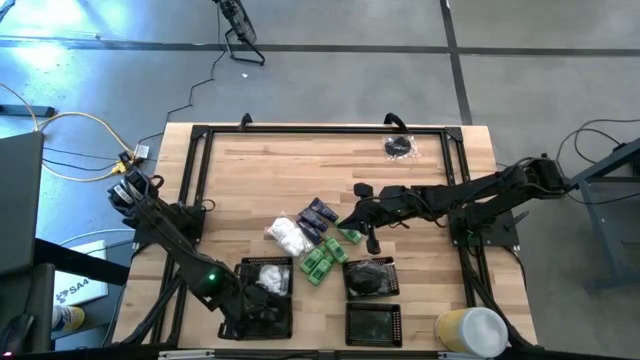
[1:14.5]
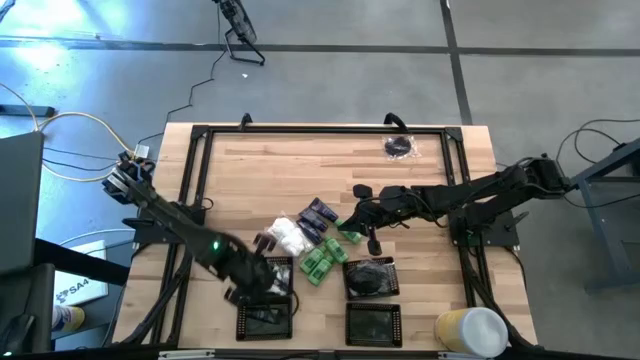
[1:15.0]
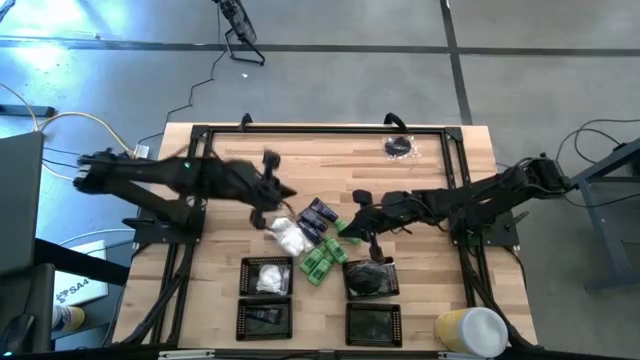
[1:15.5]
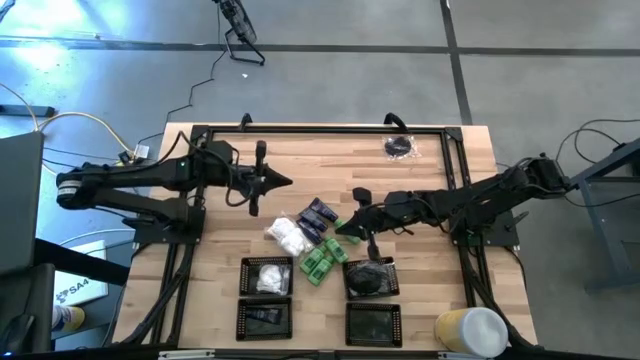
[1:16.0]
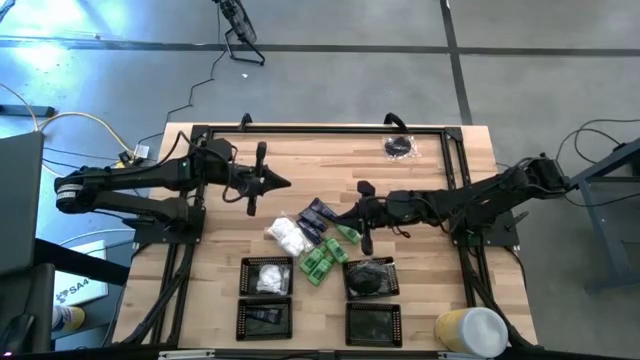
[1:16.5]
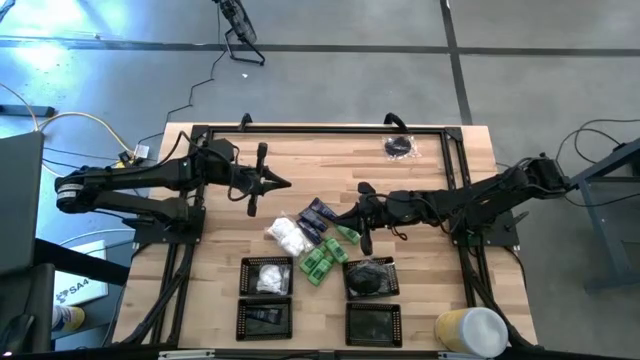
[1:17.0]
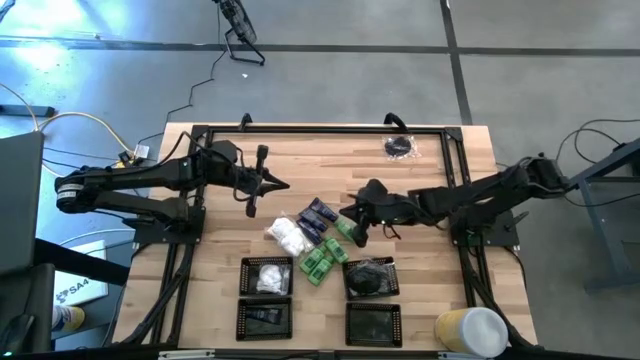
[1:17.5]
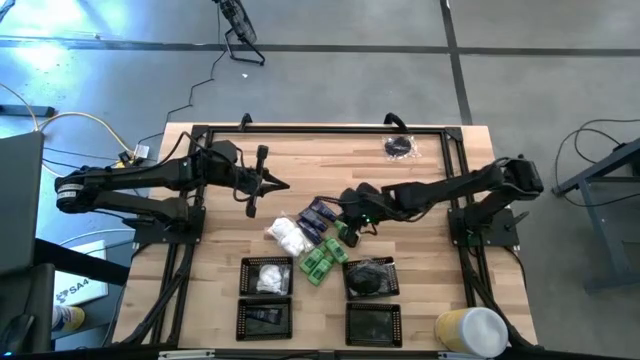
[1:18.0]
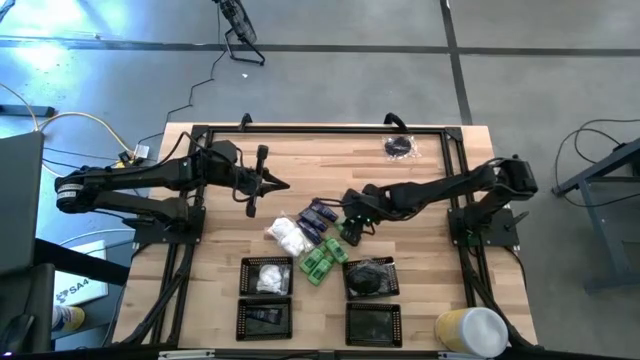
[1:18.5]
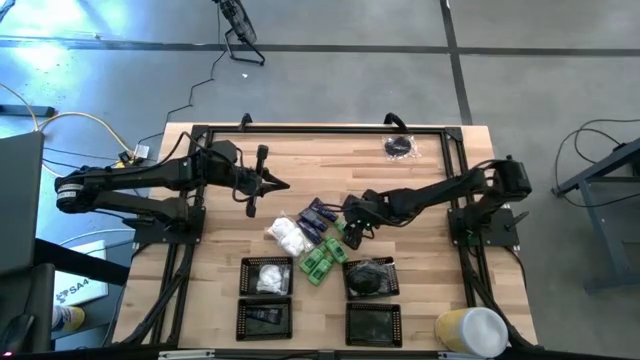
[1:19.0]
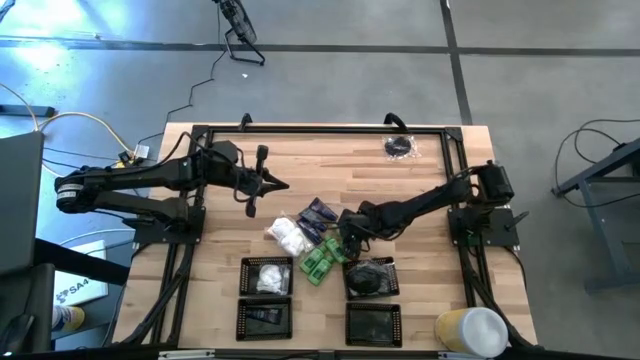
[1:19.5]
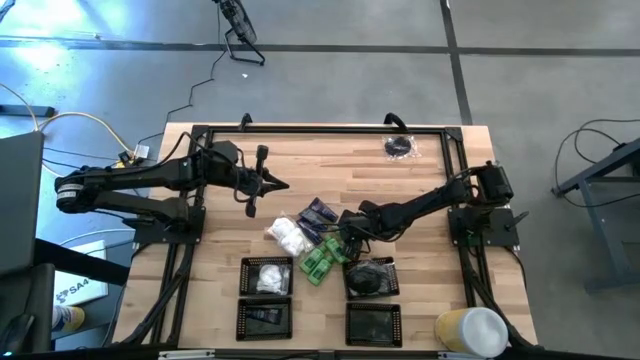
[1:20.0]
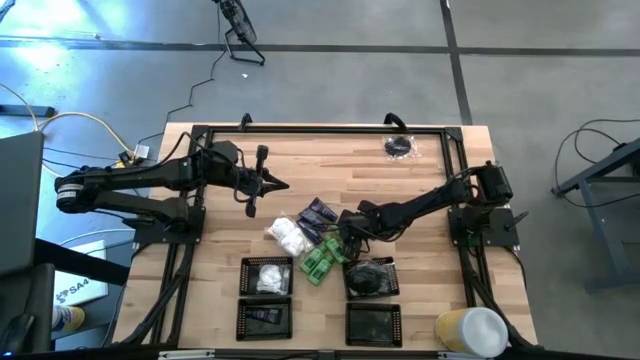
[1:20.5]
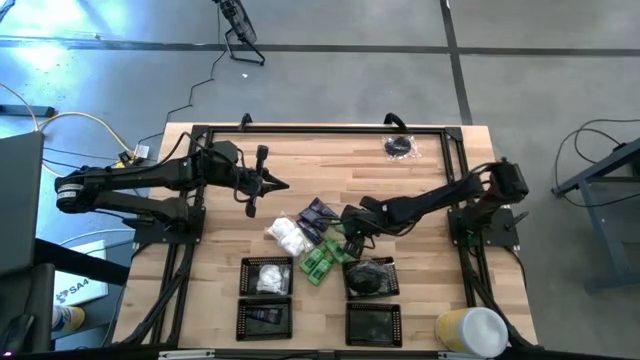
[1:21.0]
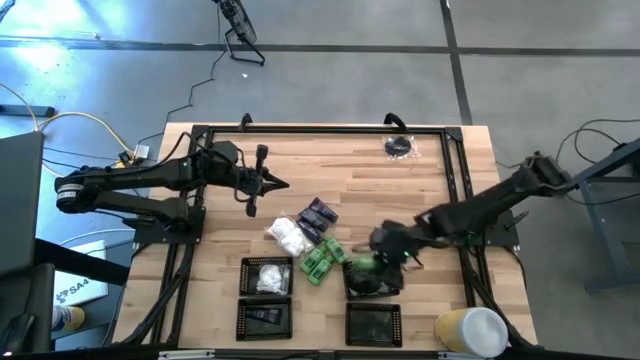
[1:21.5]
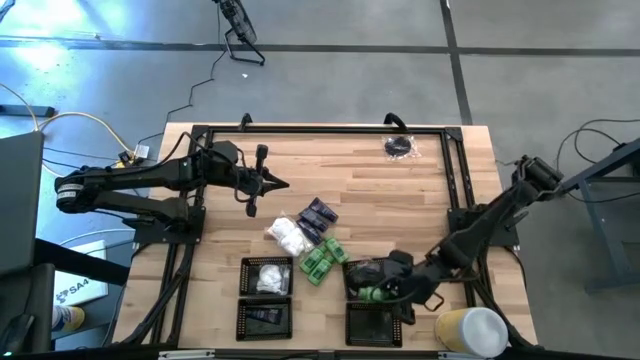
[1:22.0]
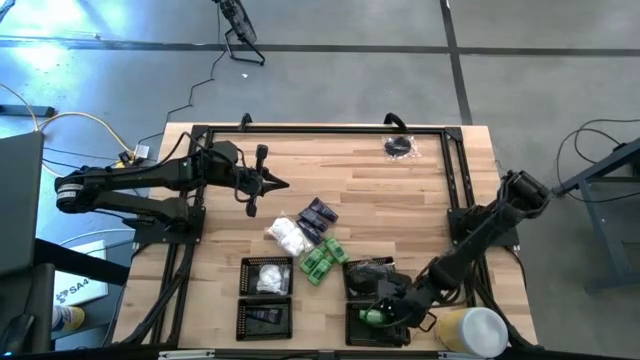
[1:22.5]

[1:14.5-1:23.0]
Task: Pick & Place Travel size toiletries
Put the green shampoo bottle into the bottom right black bin

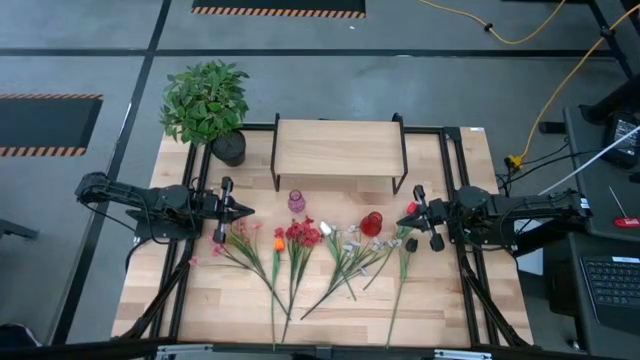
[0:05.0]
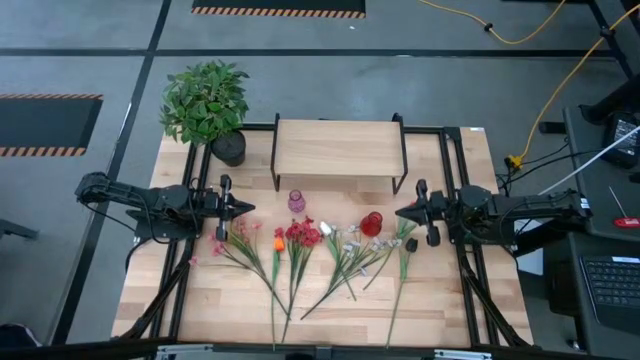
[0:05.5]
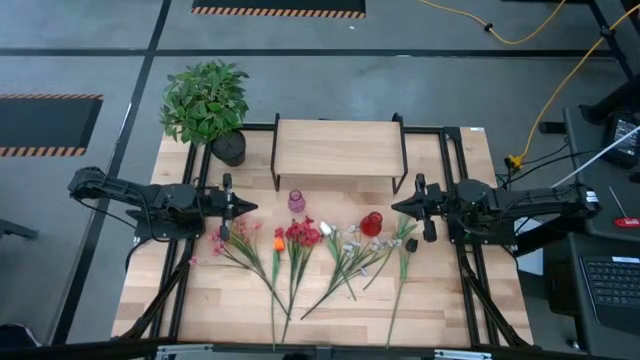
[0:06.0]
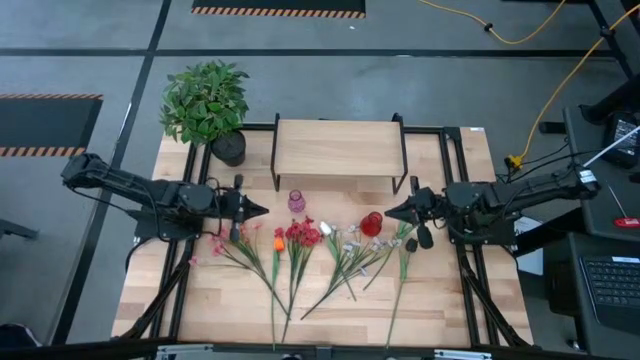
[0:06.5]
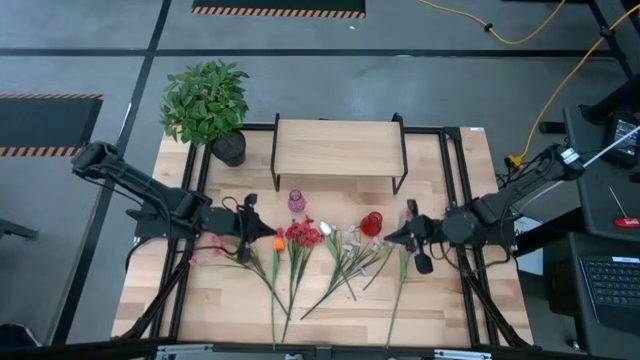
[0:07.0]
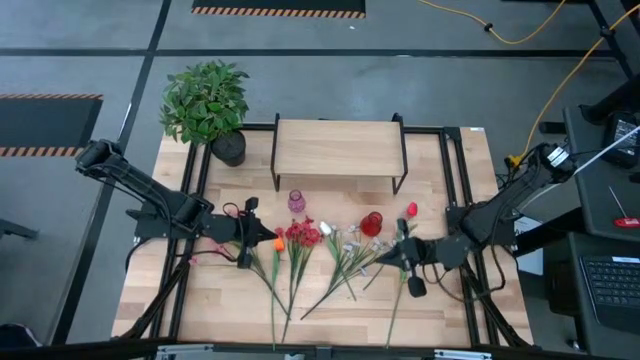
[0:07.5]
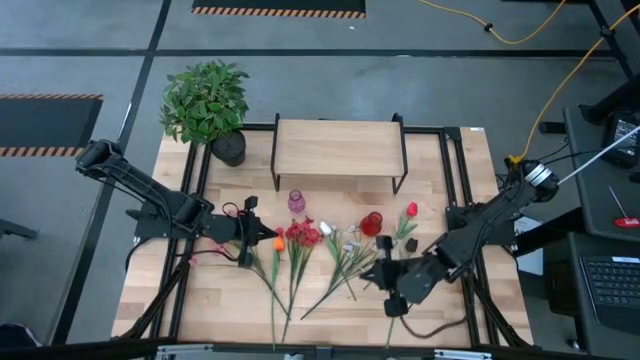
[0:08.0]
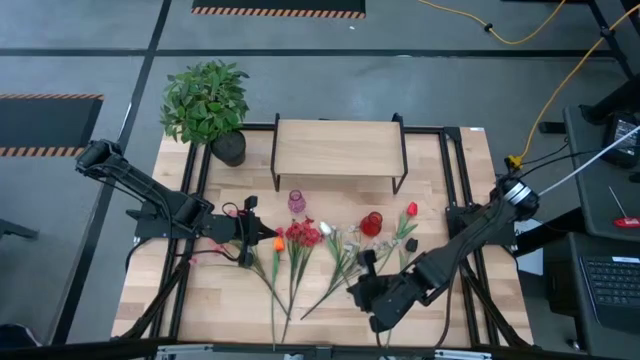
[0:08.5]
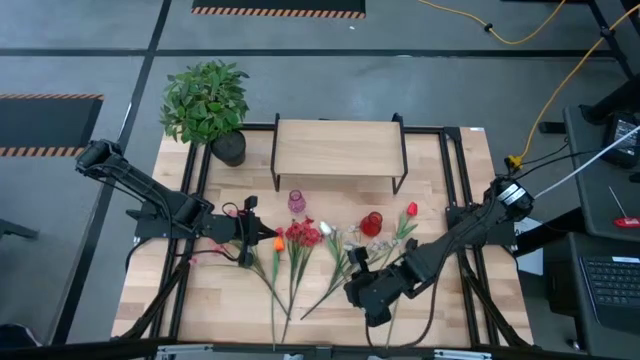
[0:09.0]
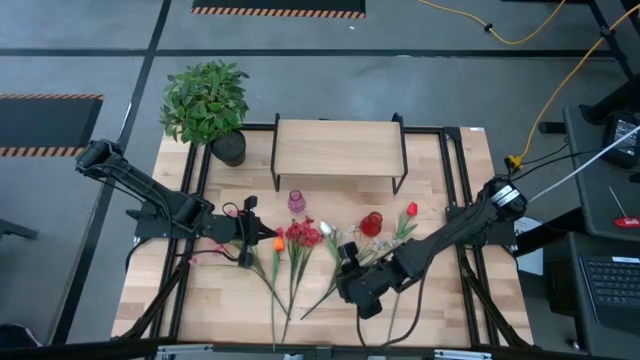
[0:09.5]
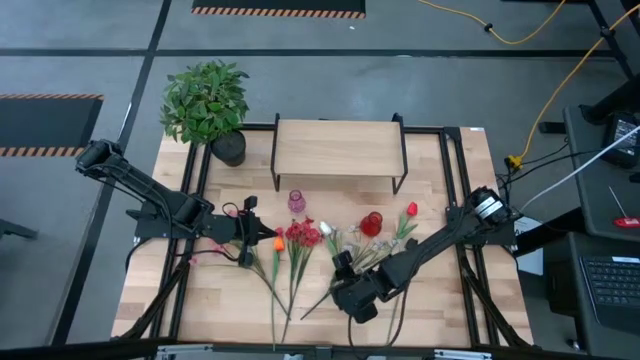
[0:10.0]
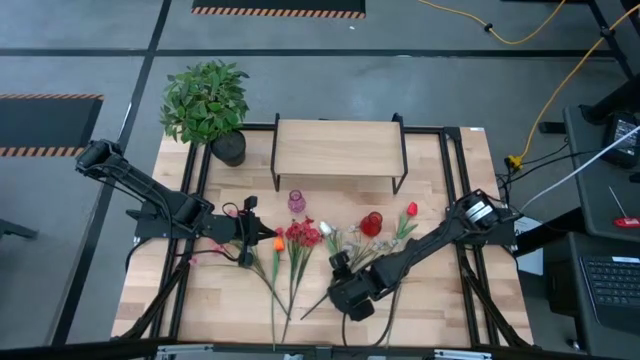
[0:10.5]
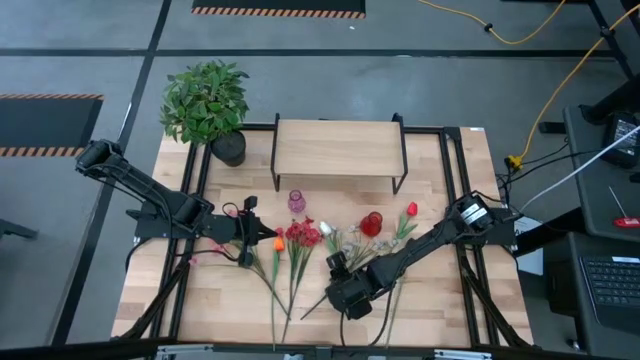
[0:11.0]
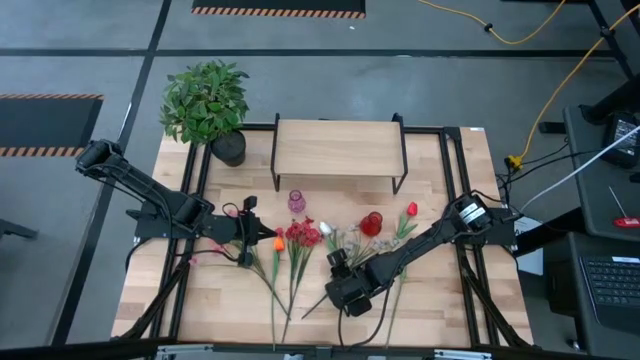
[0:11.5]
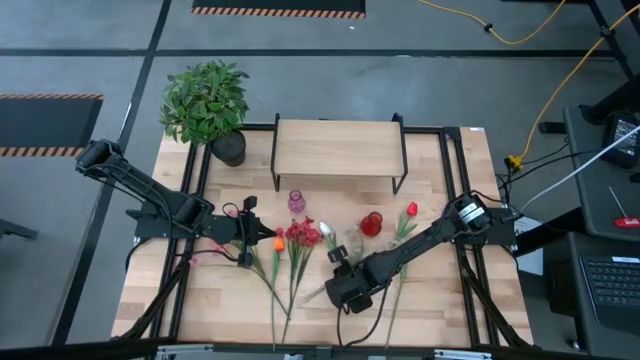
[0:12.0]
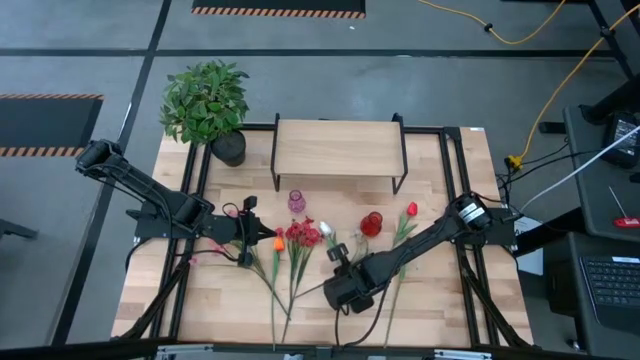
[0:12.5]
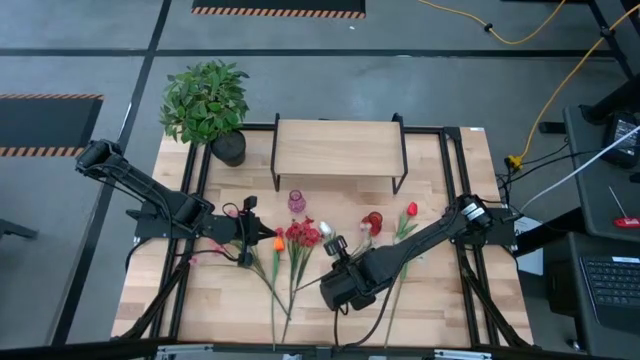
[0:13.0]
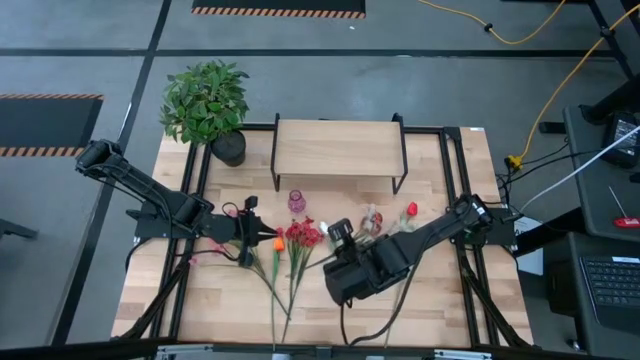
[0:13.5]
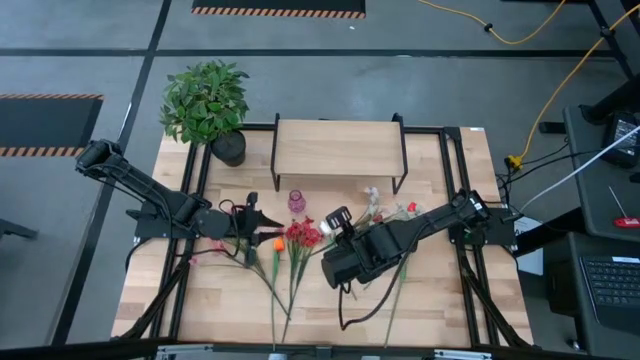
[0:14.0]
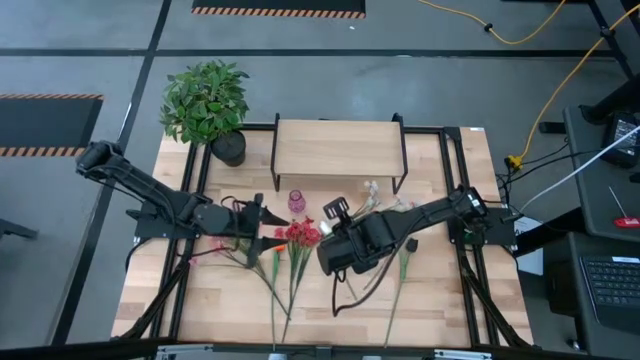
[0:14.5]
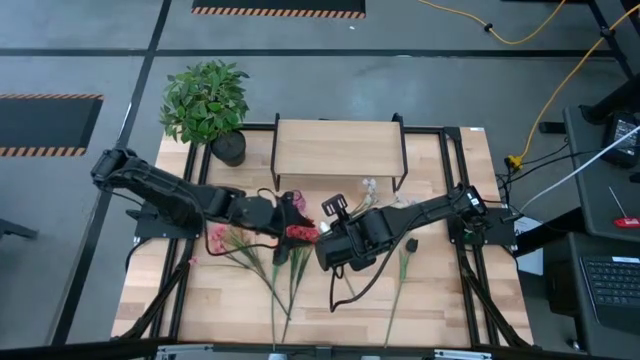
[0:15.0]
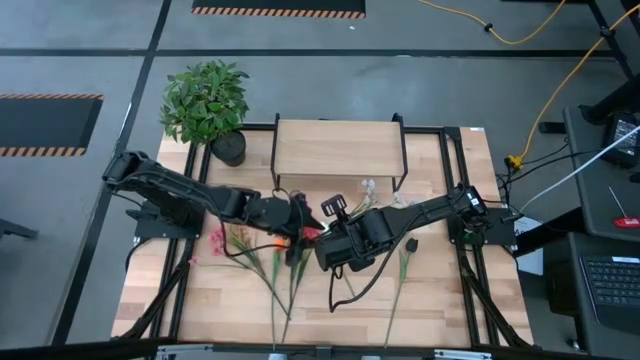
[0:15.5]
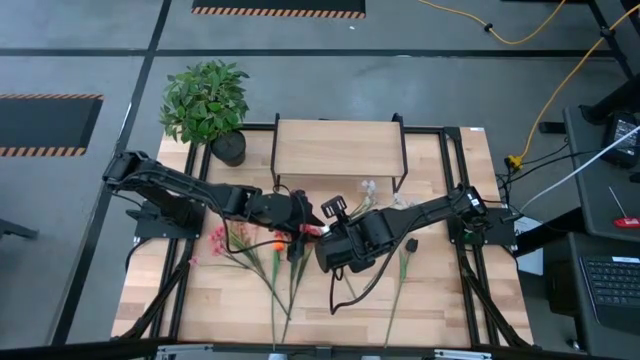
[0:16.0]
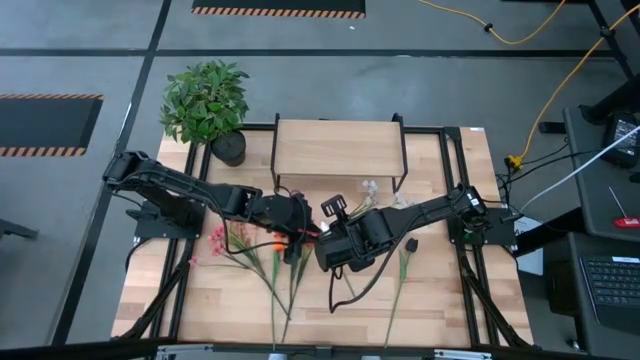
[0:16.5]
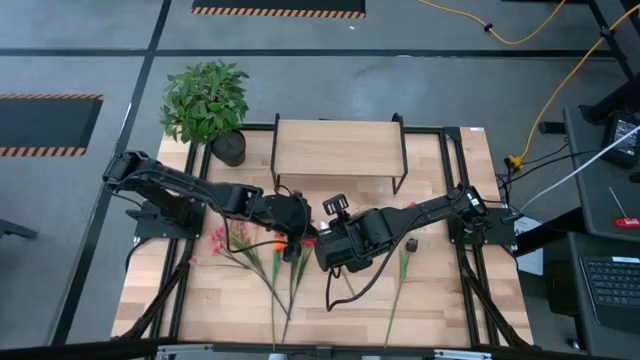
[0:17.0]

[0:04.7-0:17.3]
Task: Pick and place flowers into a vace then onto a shelf
Put the white flowers into the red vase
